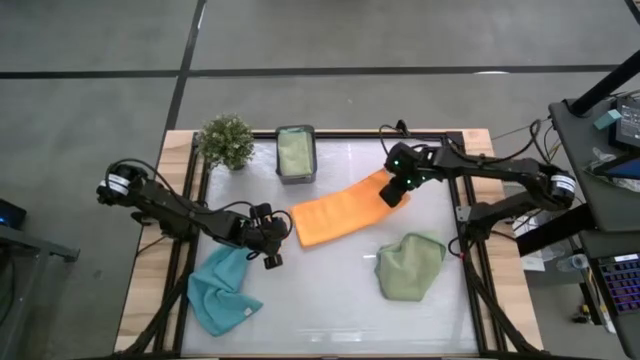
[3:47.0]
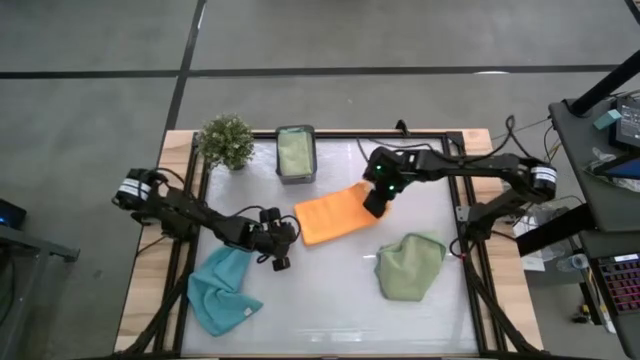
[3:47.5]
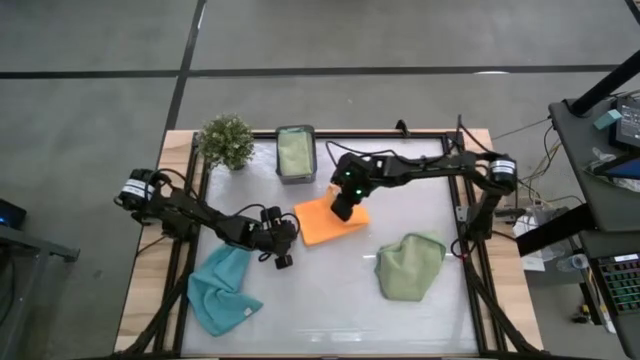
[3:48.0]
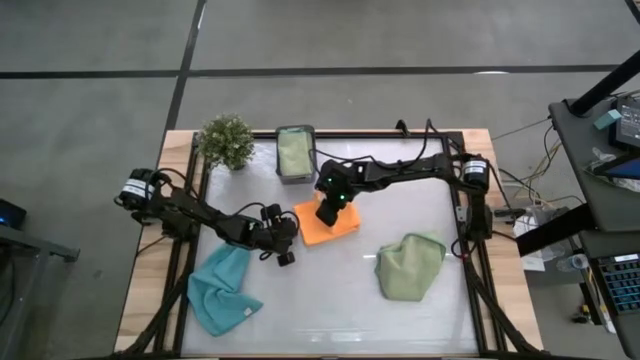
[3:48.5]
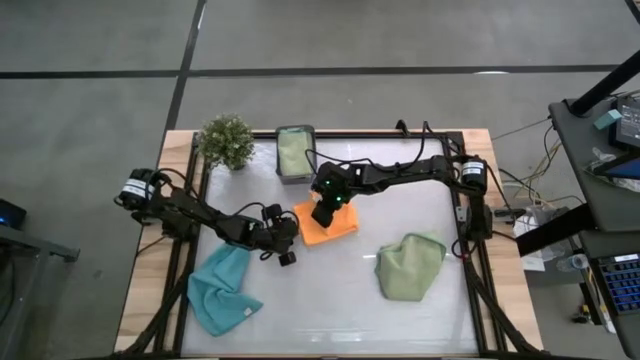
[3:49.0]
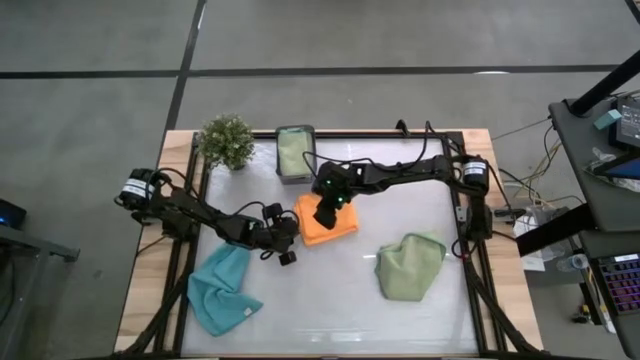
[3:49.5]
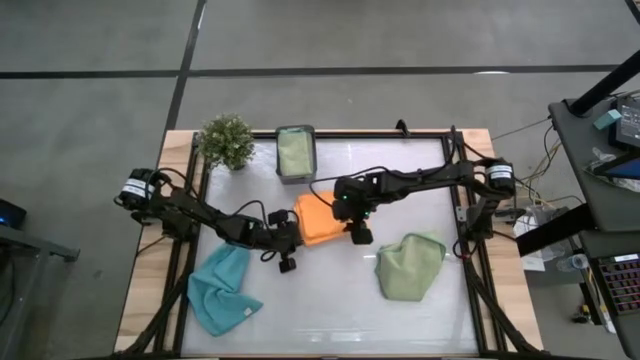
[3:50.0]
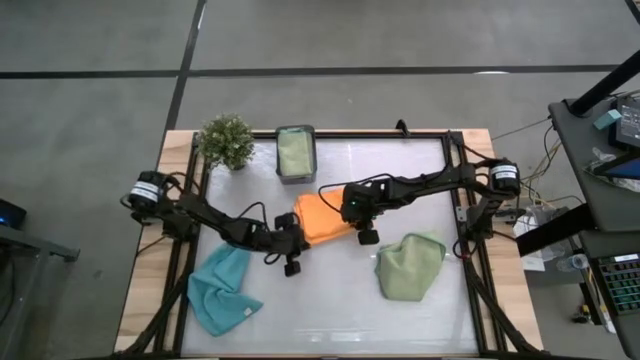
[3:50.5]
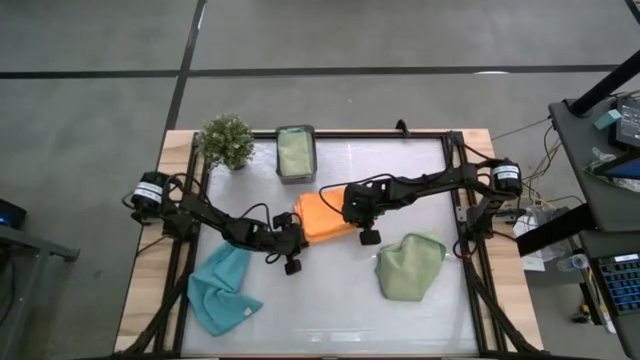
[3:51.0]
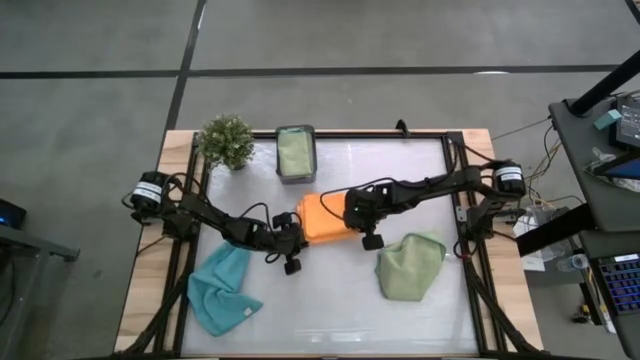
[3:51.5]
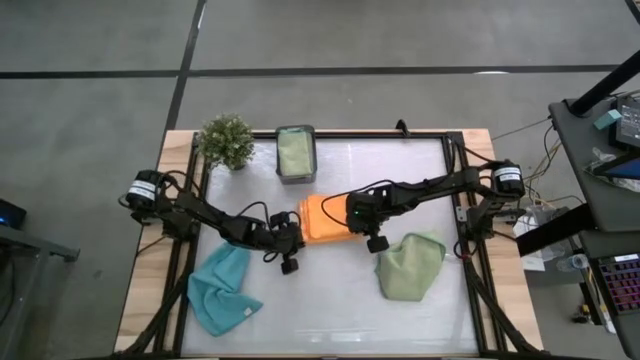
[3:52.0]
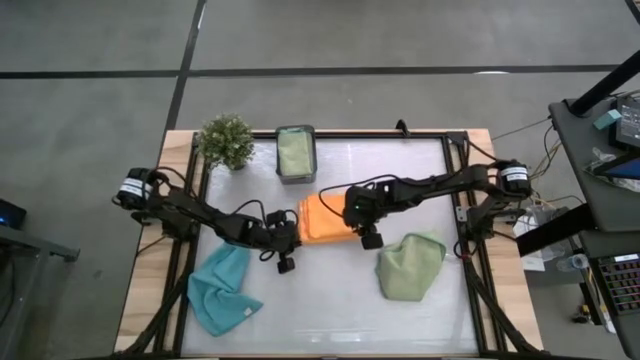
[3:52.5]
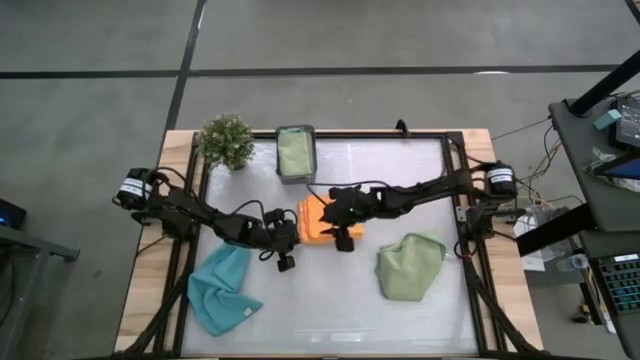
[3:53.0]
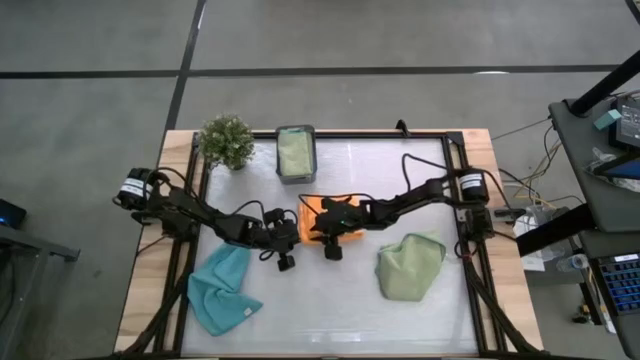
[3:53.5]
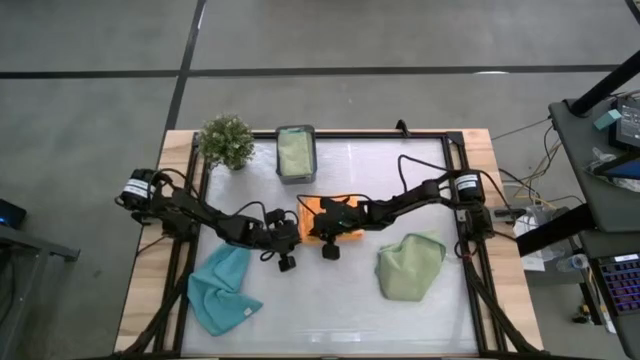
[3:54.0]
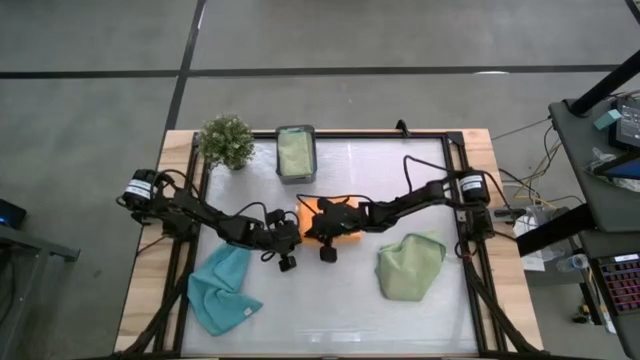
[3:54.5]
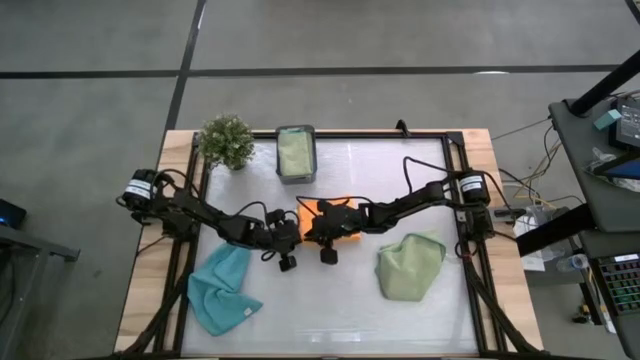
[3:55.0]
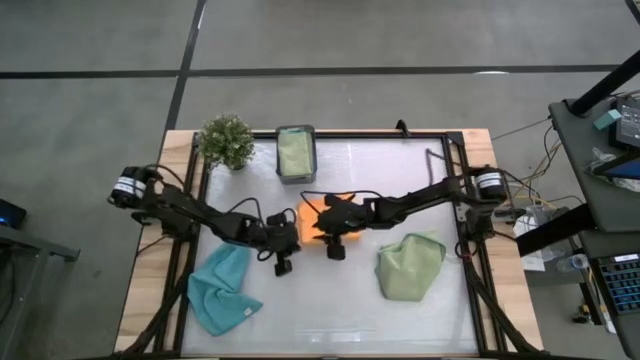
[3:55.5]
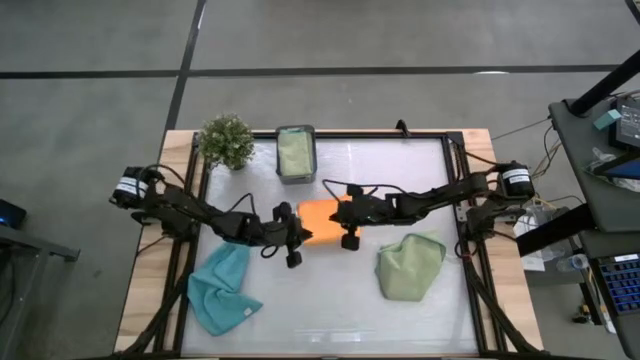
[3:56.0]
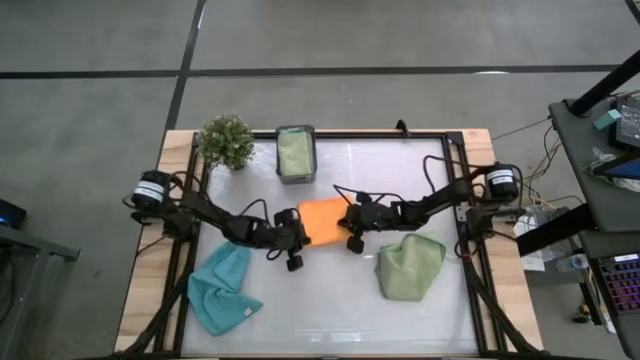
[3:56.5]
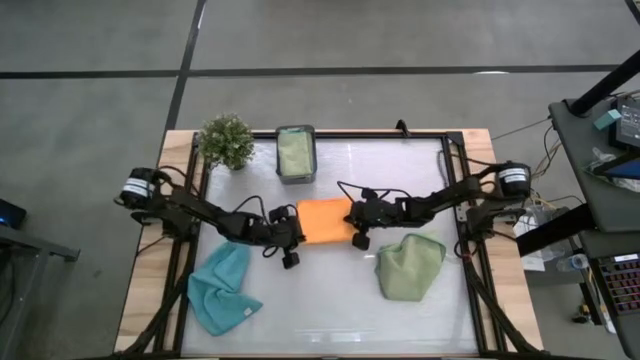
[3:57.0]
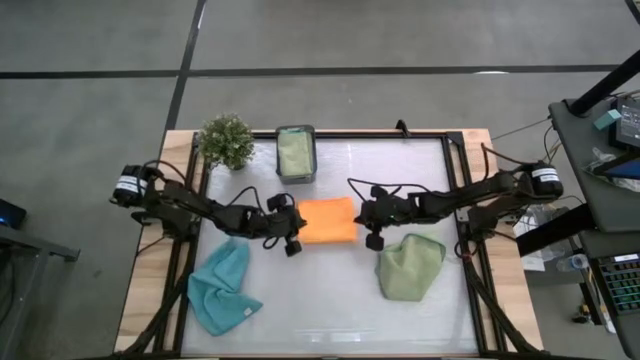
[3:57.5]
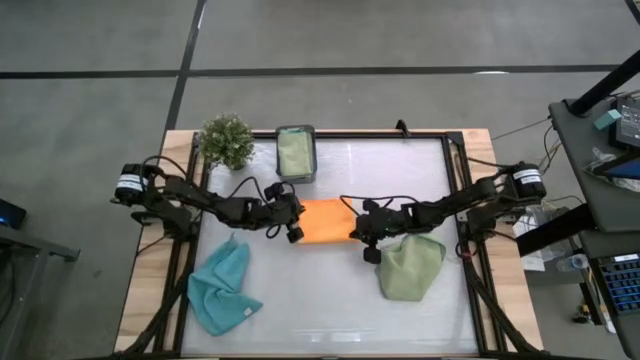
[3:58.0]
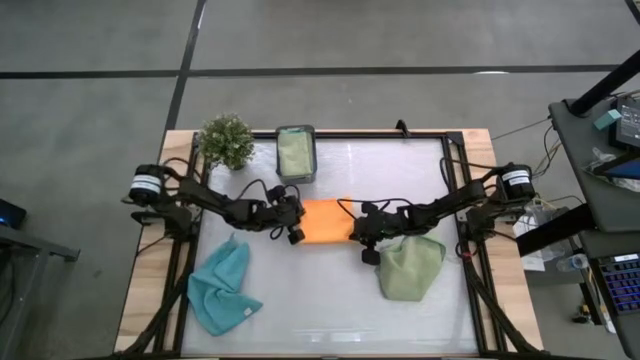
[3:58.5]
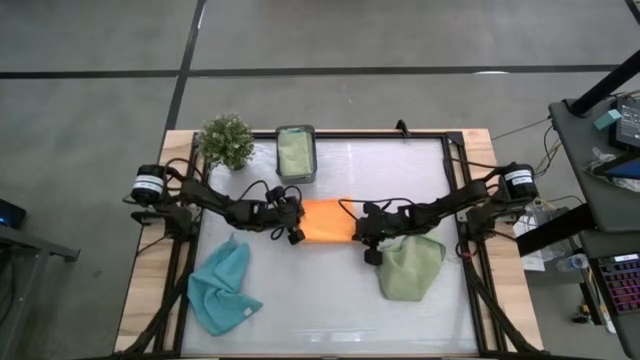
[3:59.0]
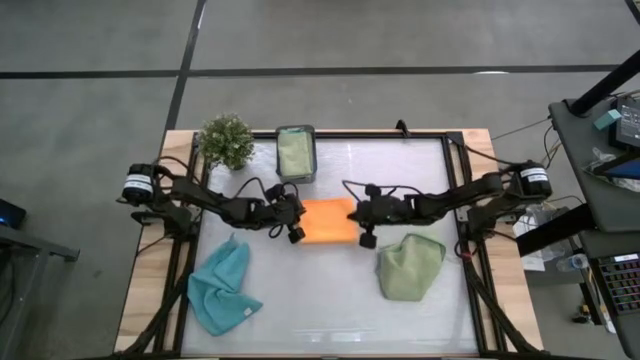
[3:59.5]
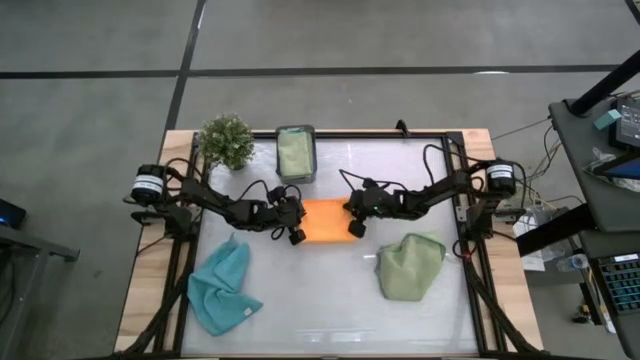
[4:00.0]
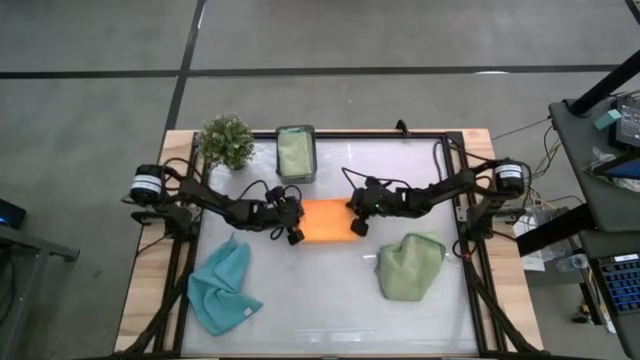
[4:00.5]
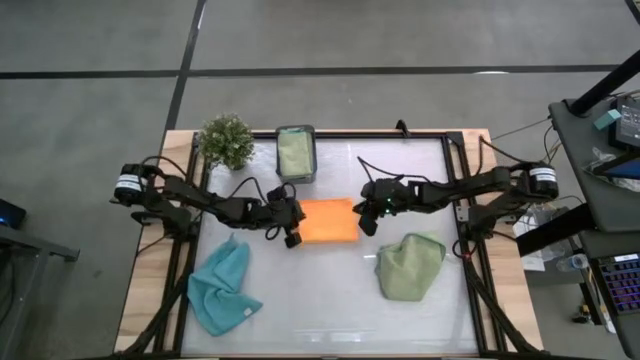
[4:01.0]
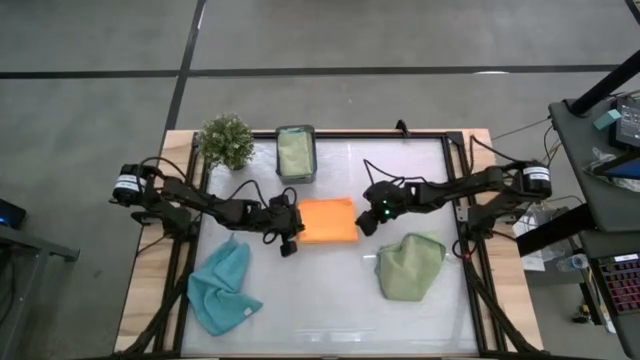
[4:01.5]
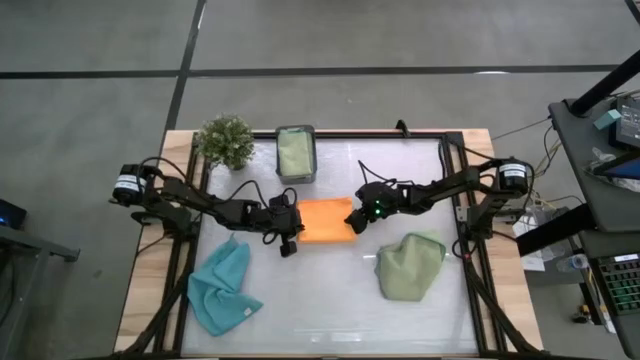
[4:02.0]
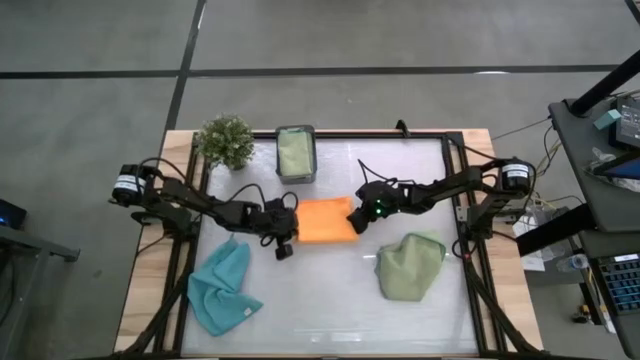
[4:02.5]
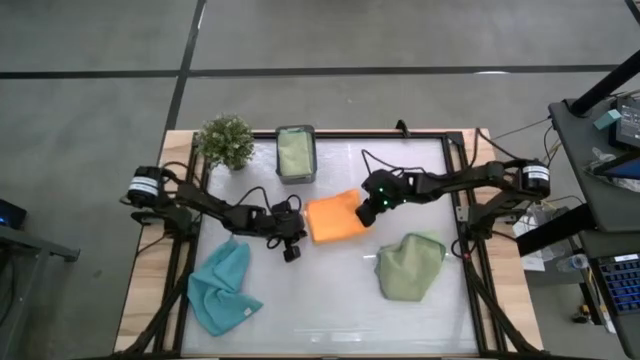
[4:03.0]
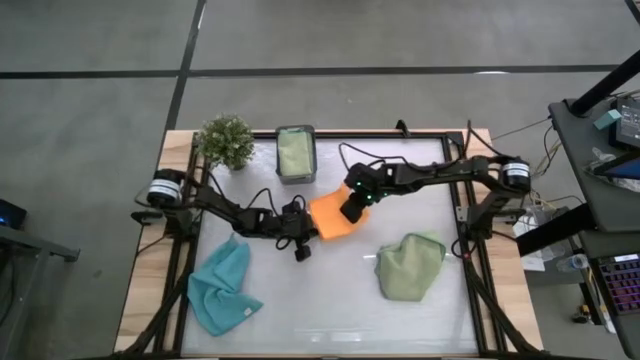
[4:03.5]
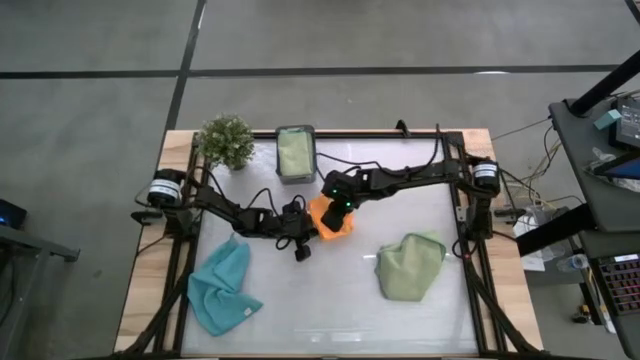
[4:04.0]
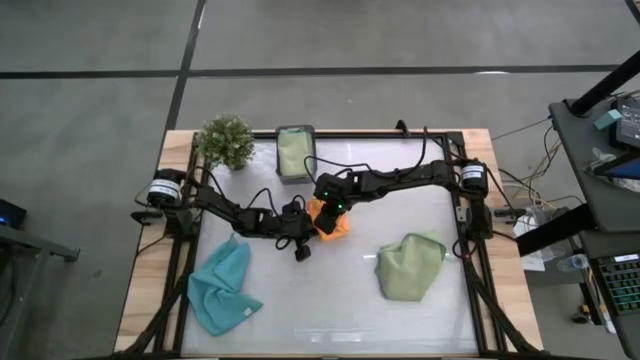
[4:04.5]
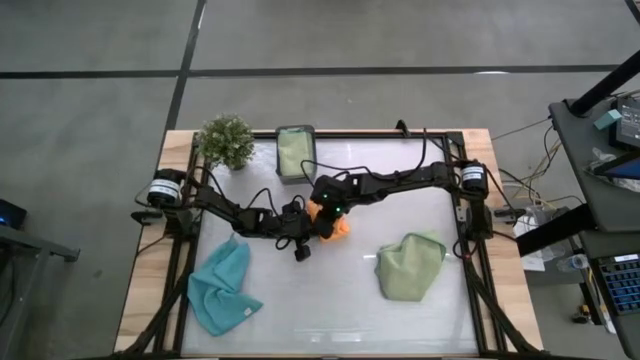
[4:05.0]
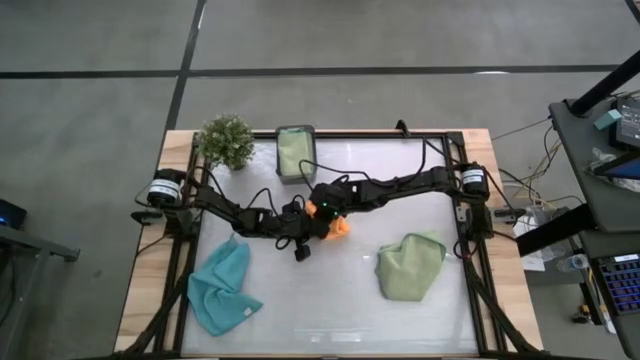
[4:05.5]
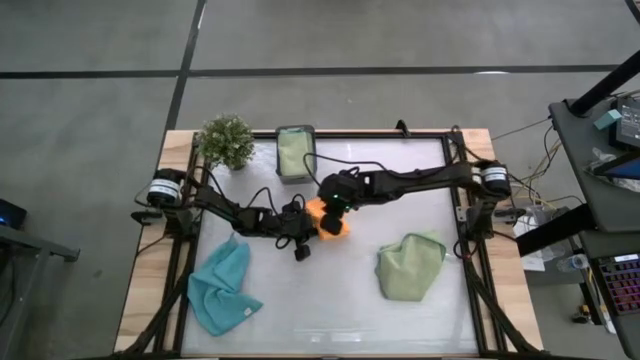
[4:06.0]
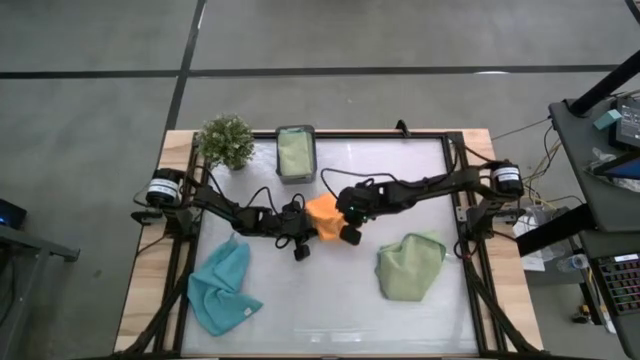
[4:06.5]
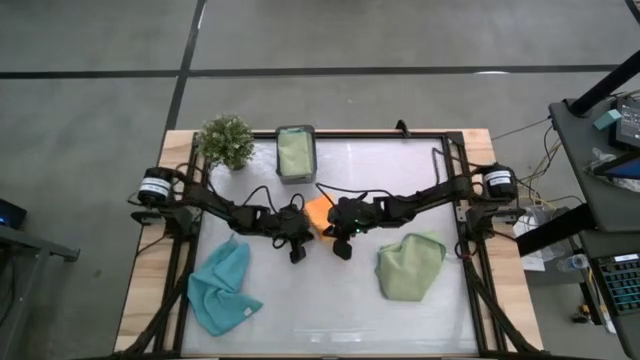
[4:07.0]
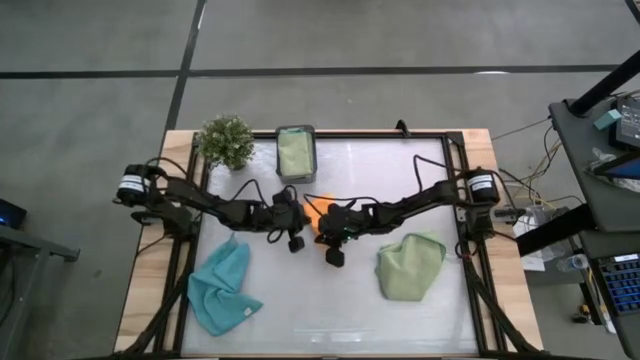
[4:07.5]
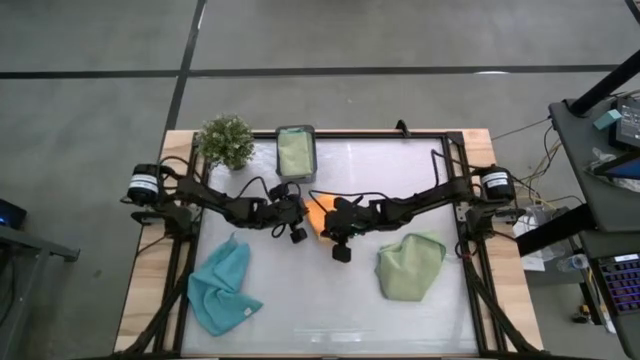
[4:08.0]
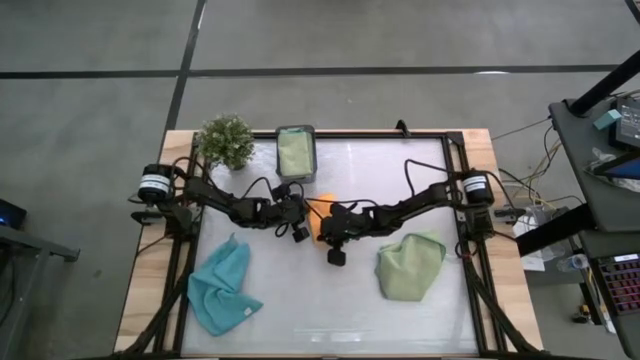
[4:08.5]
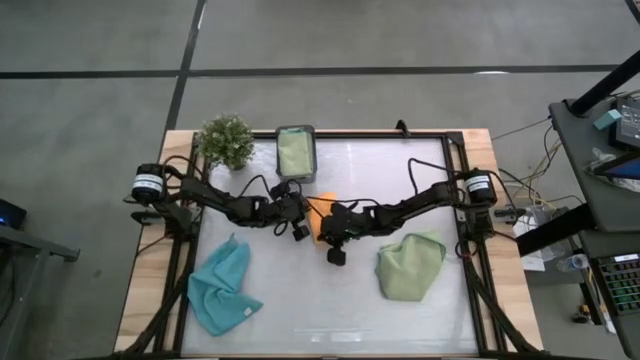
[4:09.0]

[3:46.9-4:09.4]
Task: Fold microfiber towels
Fold the yellow towel
